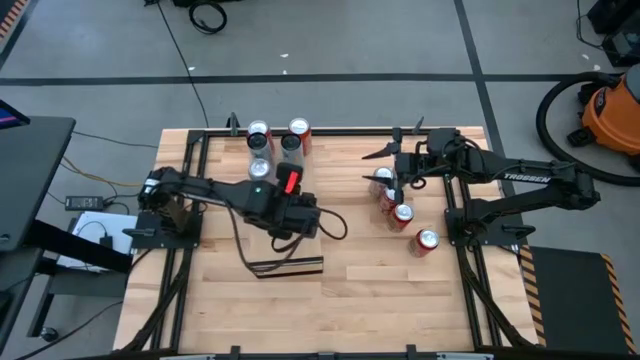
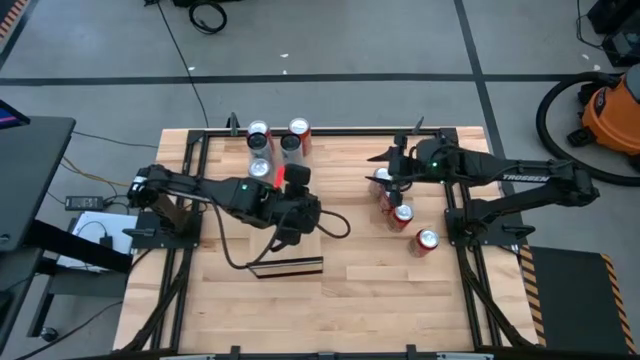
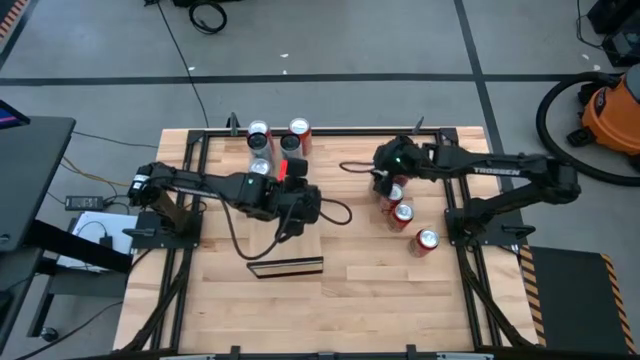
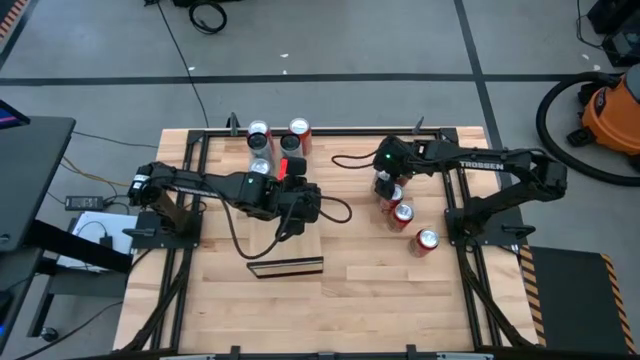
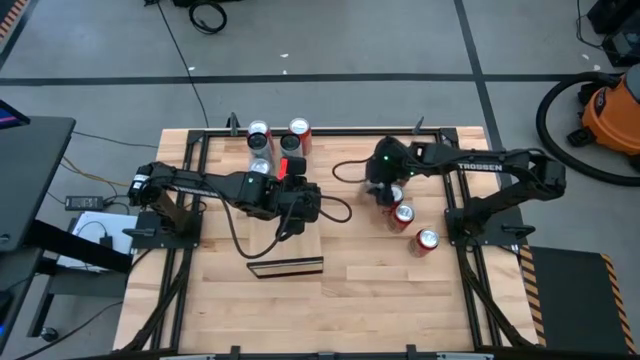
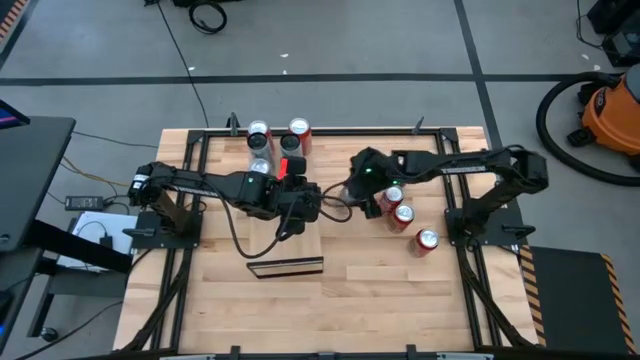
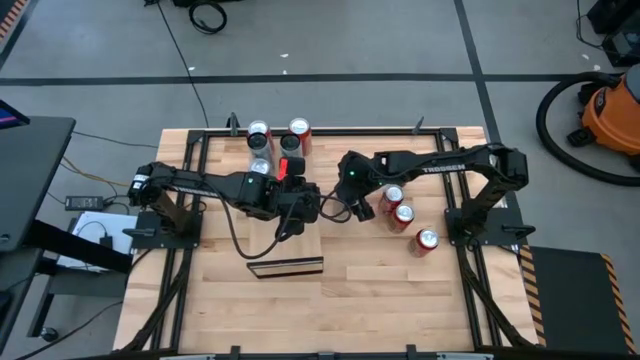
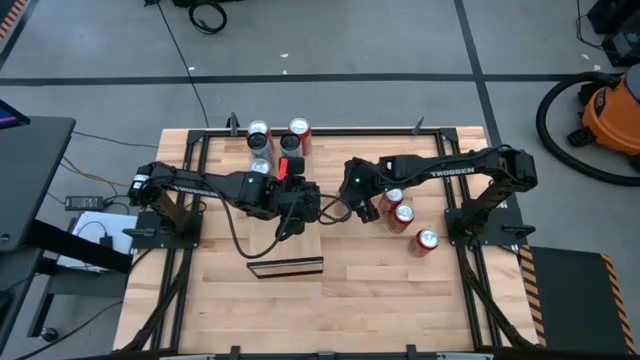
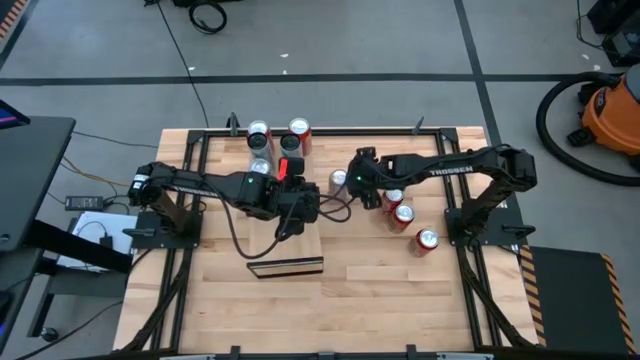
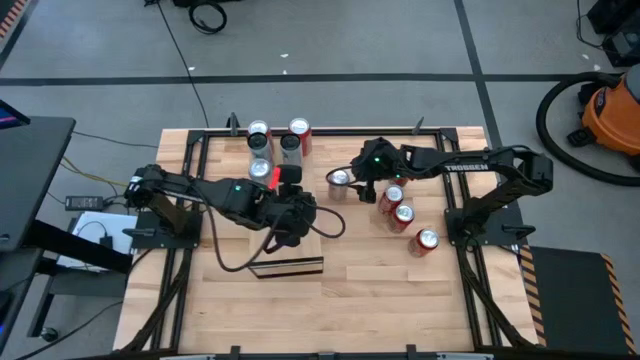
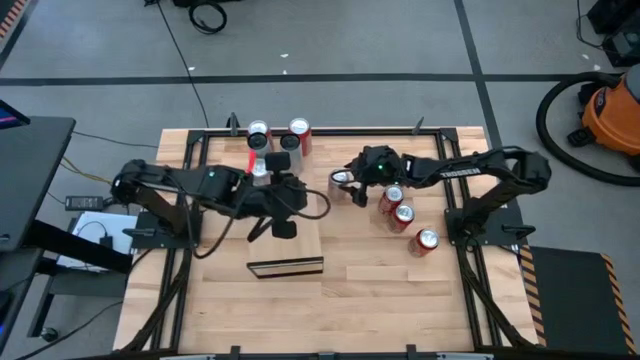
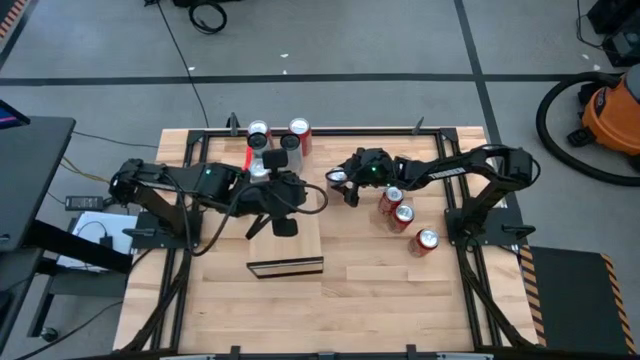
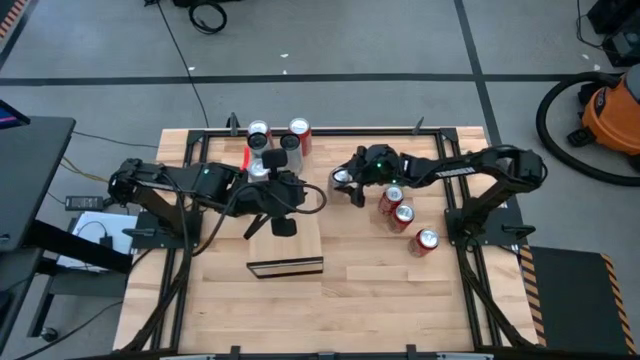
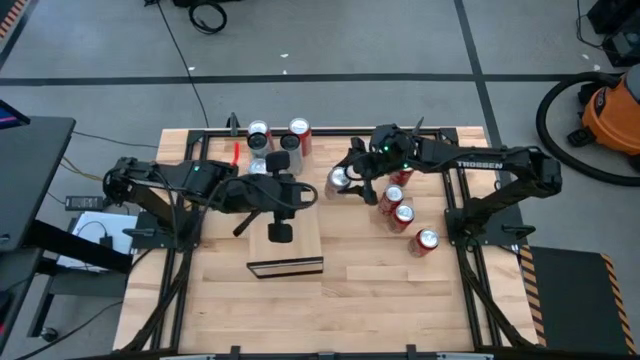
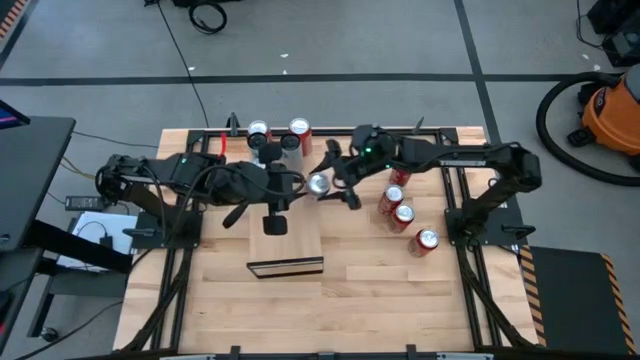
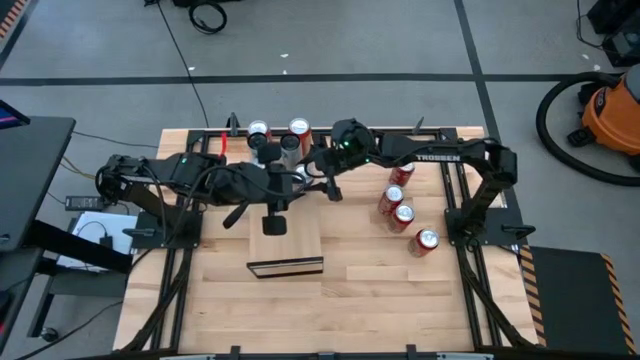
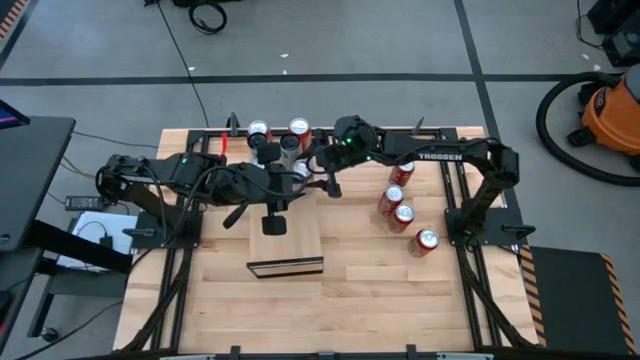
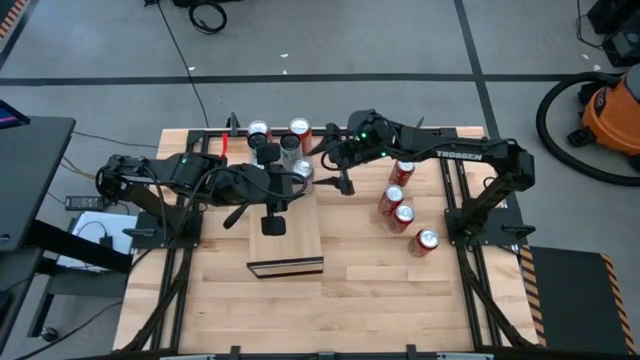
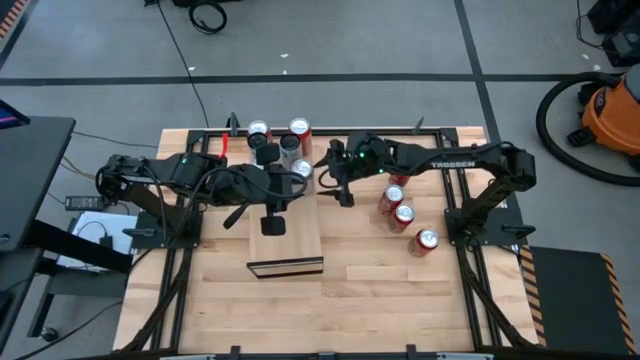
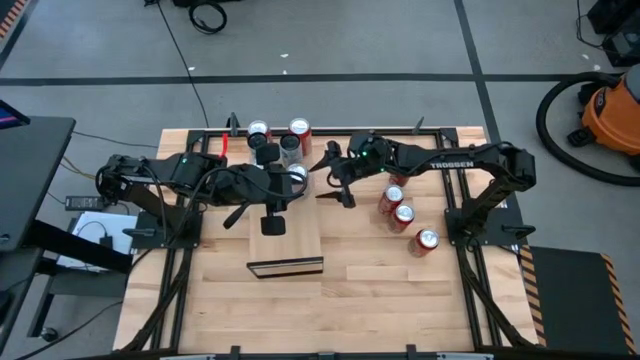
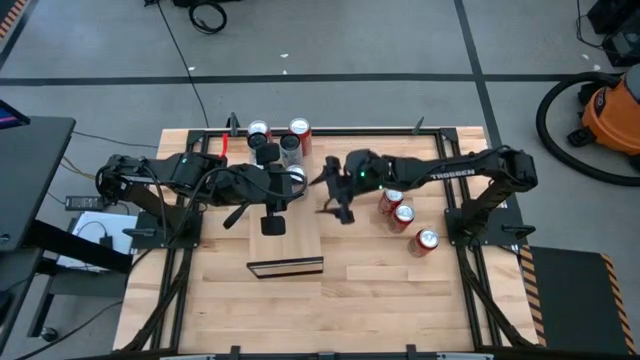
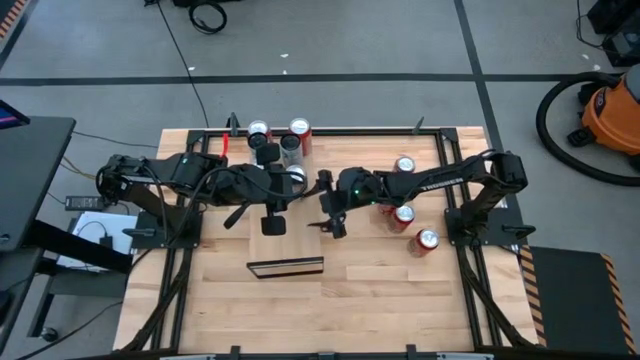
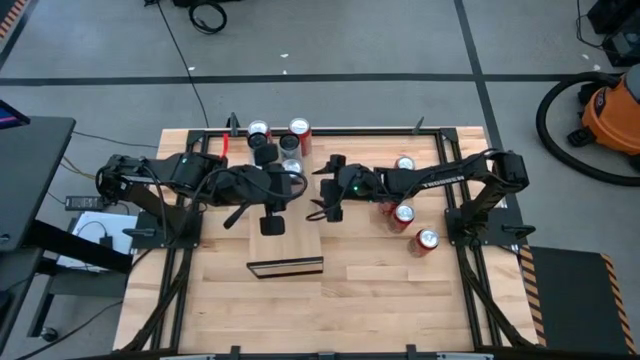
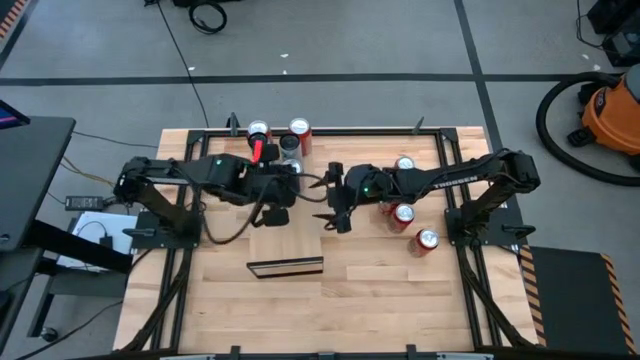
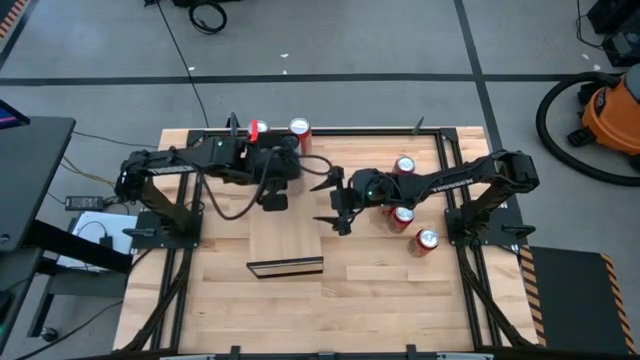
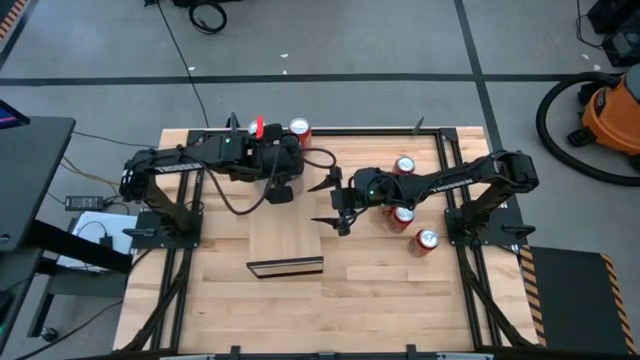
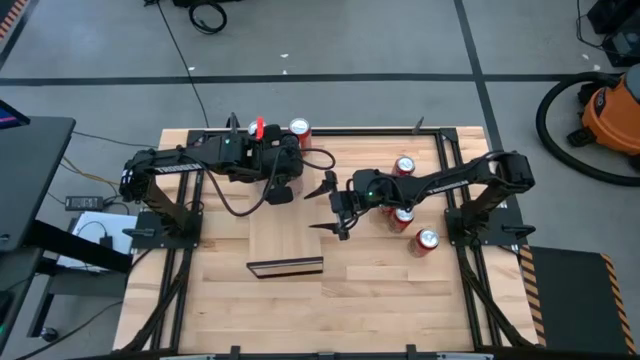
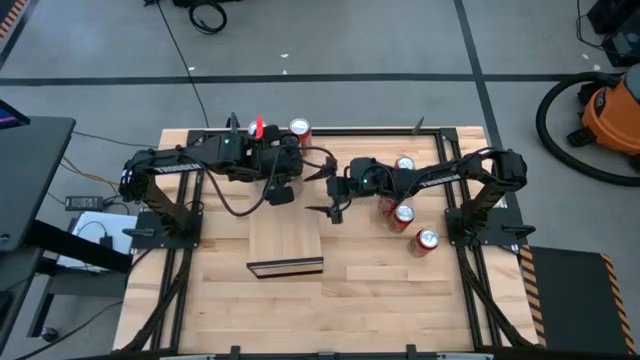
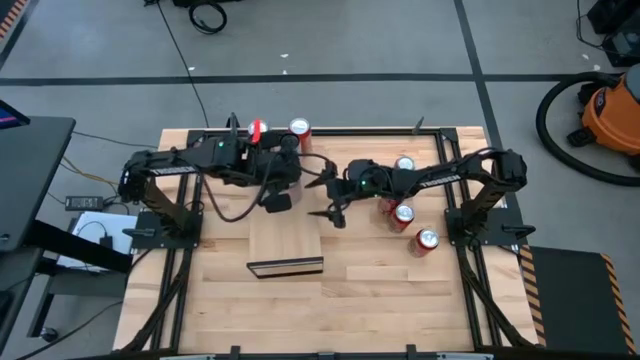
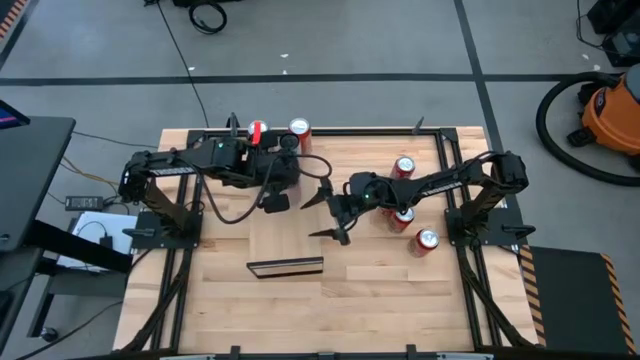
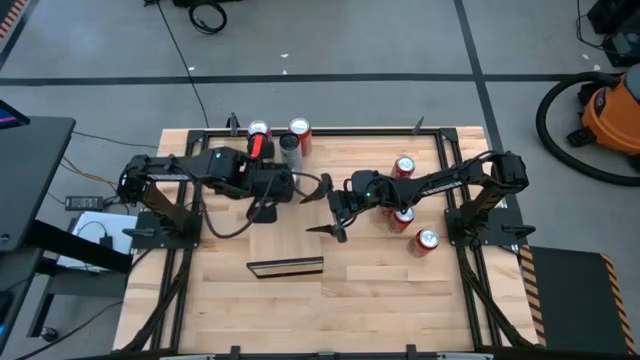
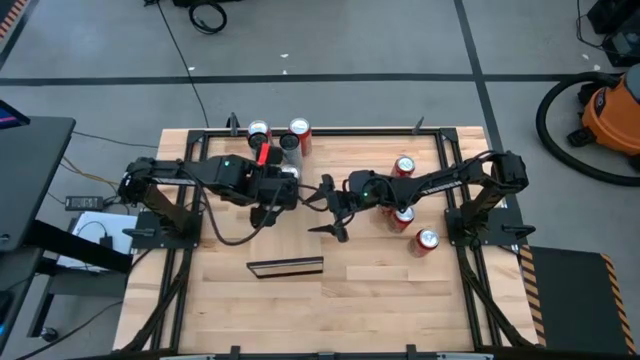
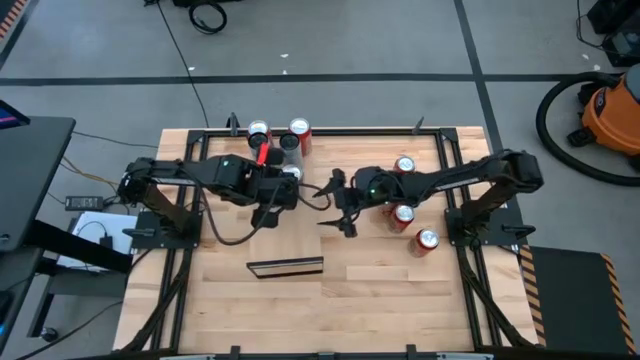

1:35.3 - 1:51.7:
Task: Place canned beverage on shelf
Align the red and silver soda can with the other red and silver soda can on the shelf

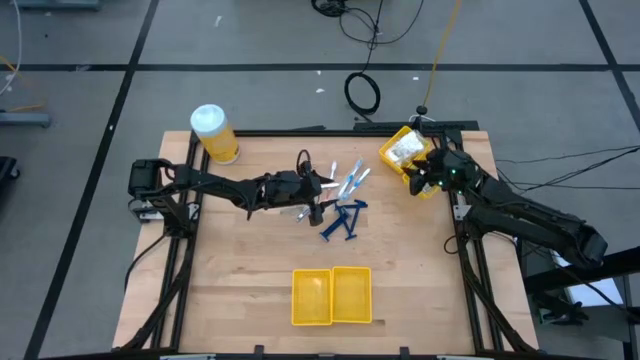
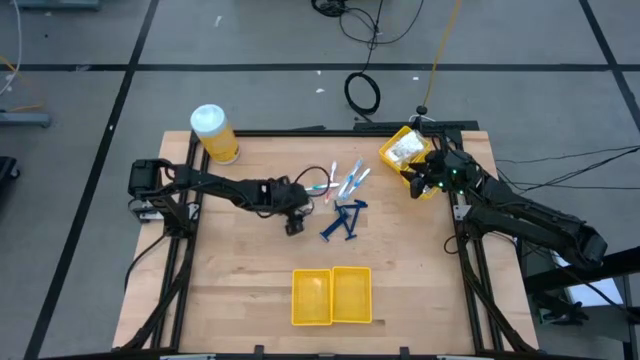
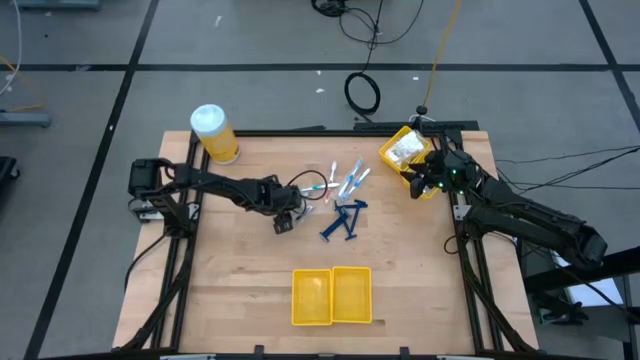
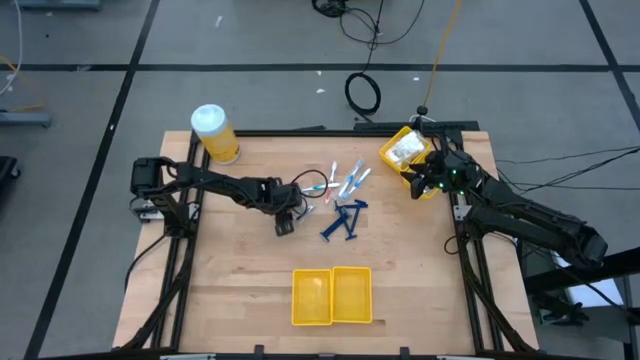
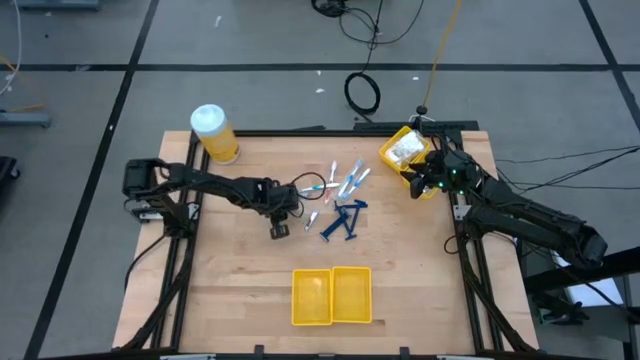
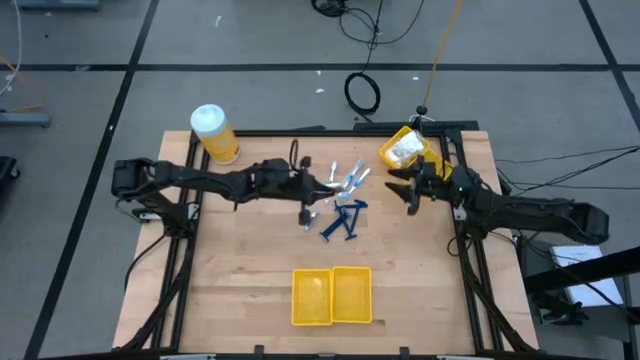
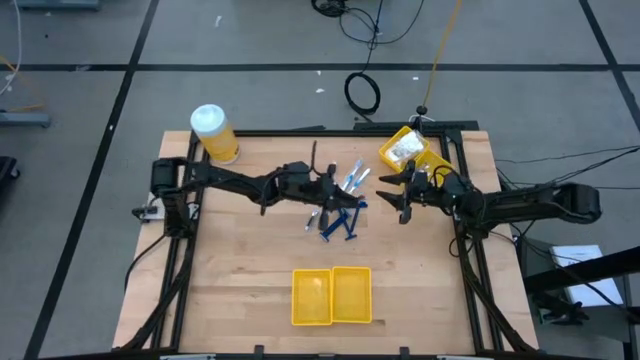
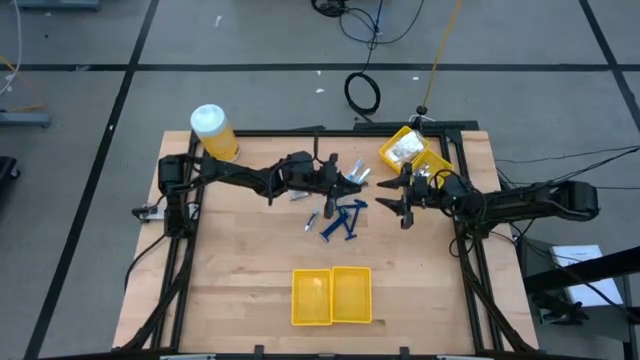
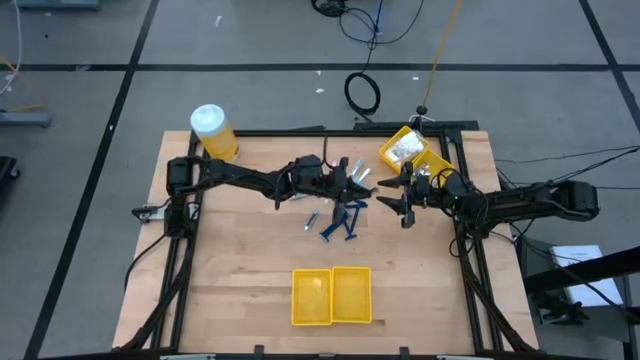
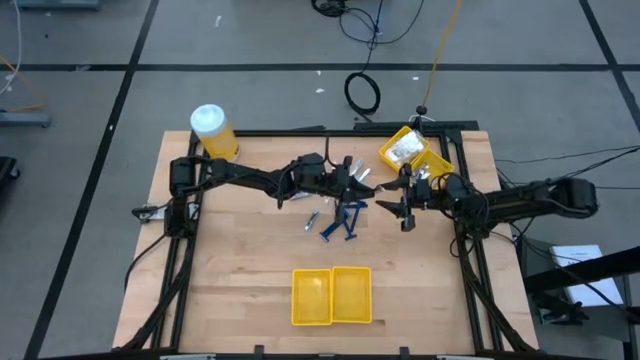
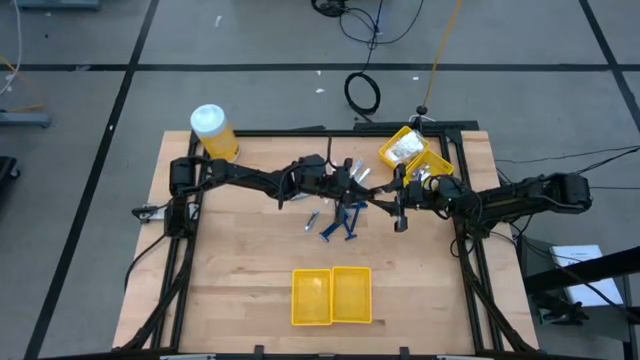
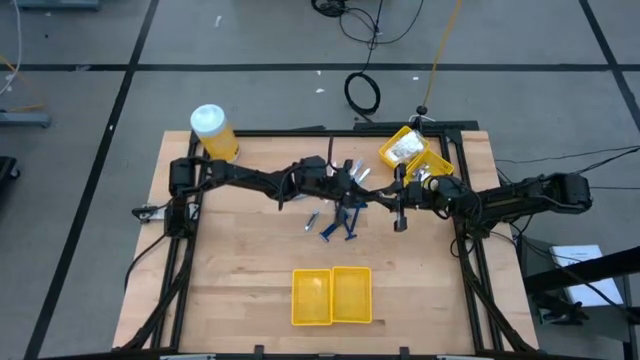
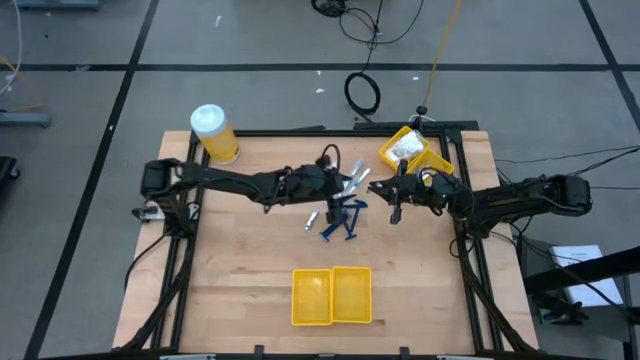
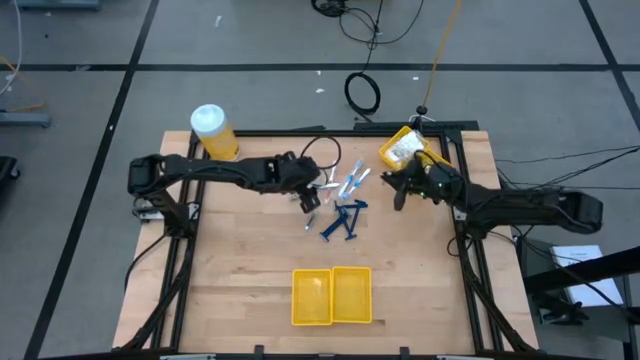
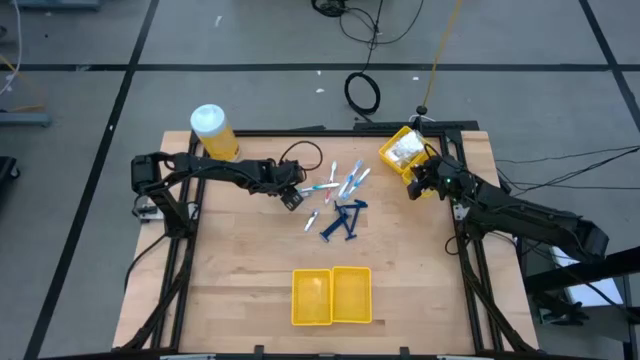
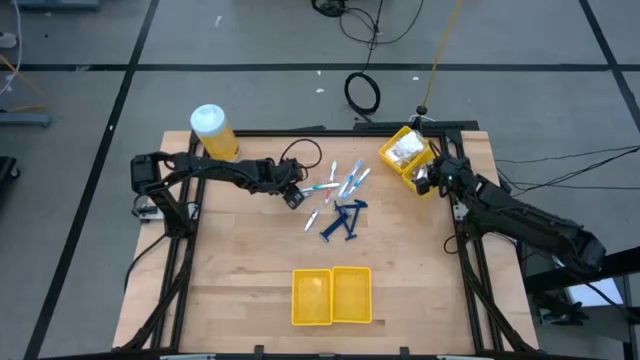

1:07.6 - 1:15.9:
Task: Pick & Place Travel size toiletries
Put the silver nail cutter into the top right yellow bin
